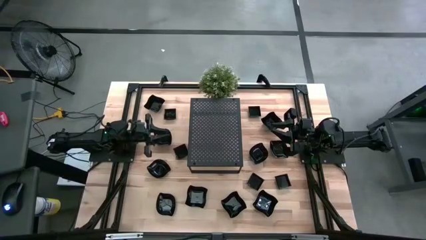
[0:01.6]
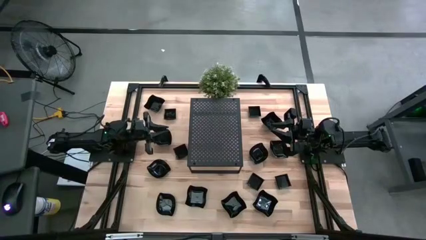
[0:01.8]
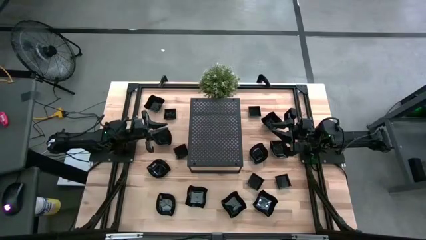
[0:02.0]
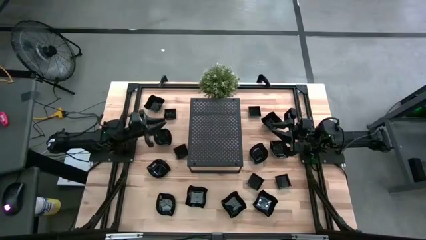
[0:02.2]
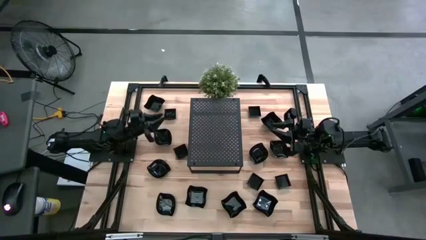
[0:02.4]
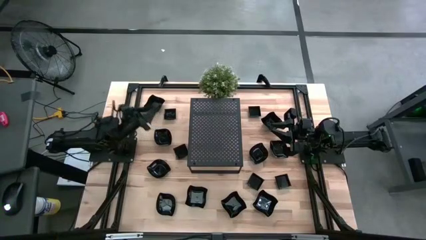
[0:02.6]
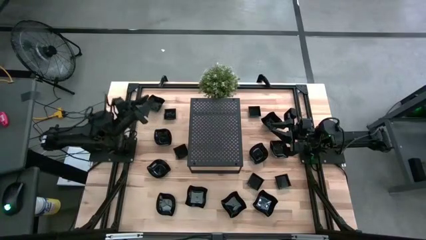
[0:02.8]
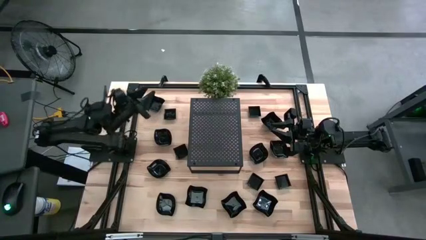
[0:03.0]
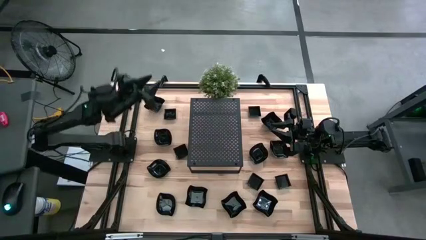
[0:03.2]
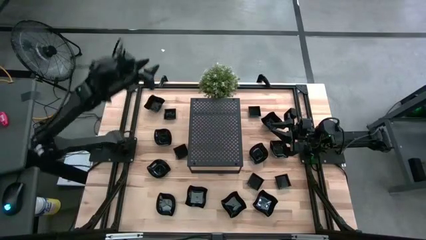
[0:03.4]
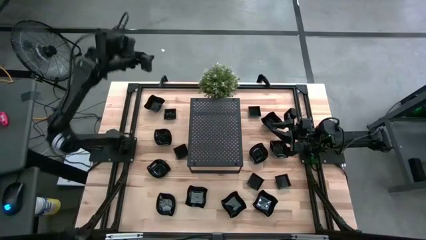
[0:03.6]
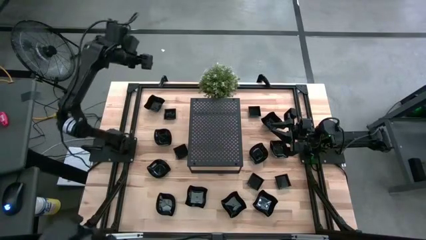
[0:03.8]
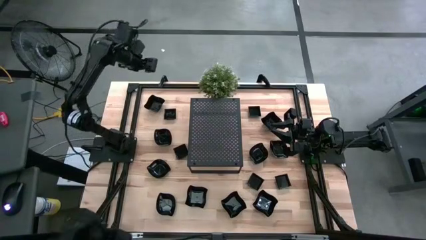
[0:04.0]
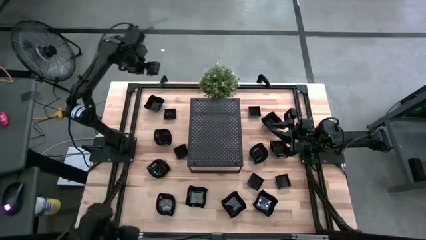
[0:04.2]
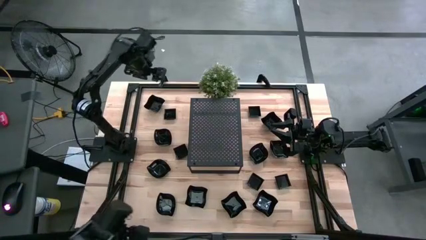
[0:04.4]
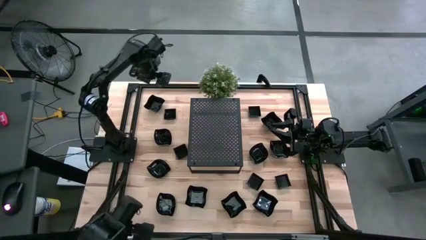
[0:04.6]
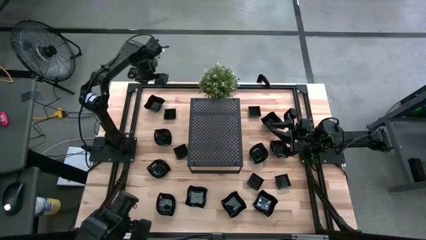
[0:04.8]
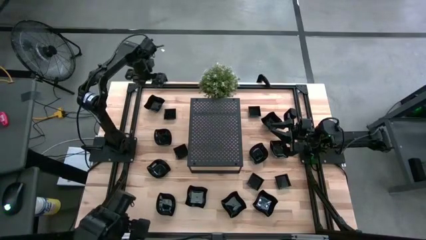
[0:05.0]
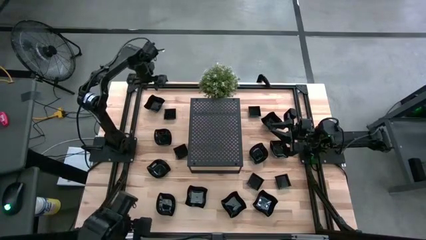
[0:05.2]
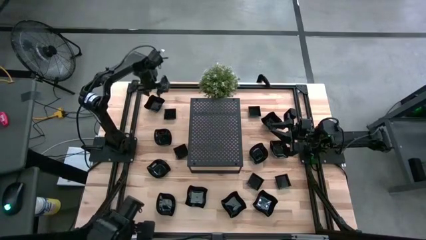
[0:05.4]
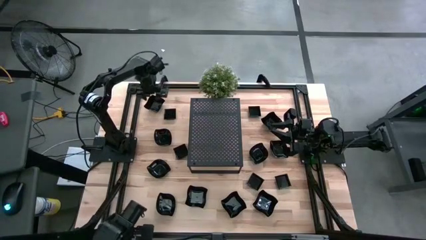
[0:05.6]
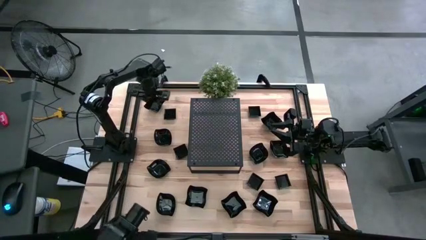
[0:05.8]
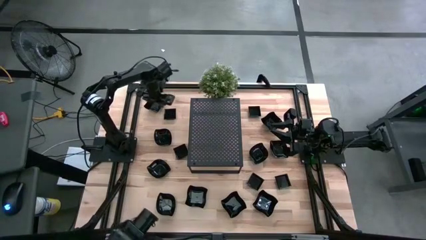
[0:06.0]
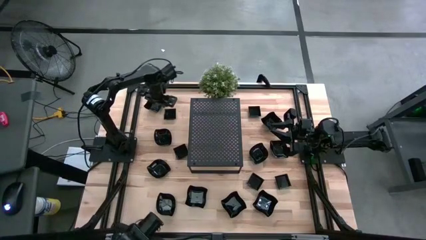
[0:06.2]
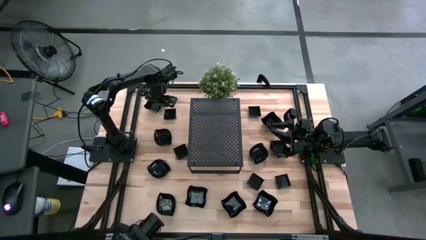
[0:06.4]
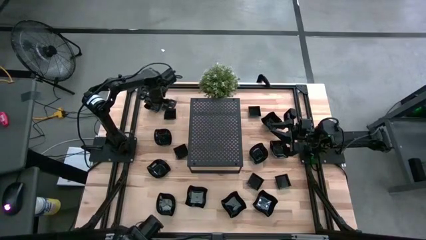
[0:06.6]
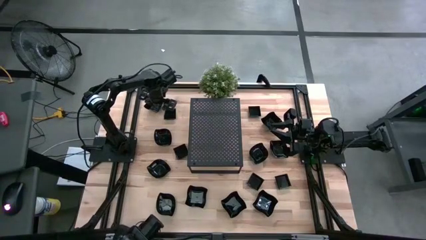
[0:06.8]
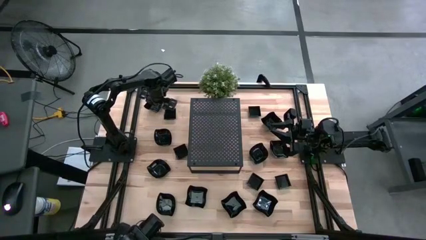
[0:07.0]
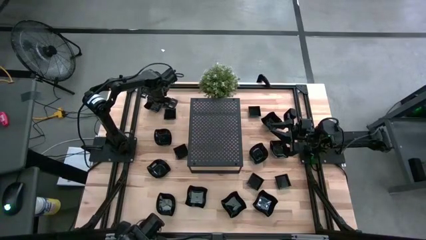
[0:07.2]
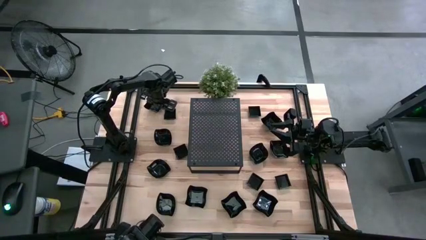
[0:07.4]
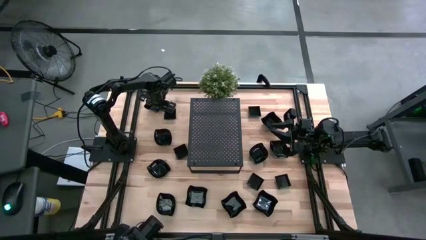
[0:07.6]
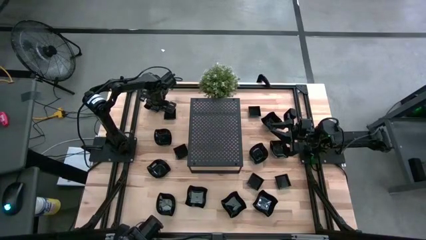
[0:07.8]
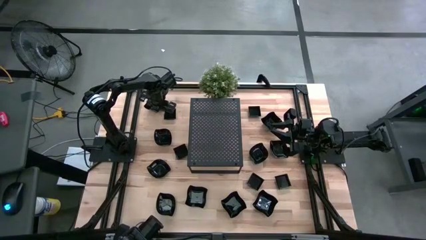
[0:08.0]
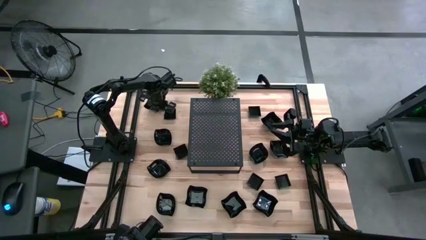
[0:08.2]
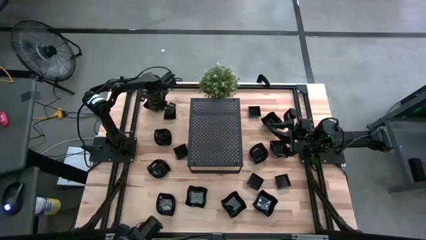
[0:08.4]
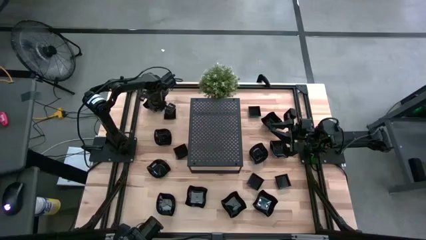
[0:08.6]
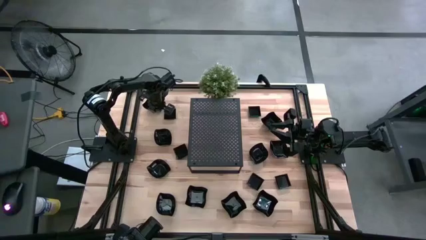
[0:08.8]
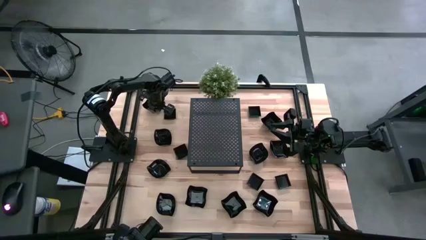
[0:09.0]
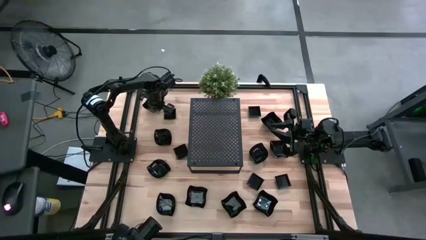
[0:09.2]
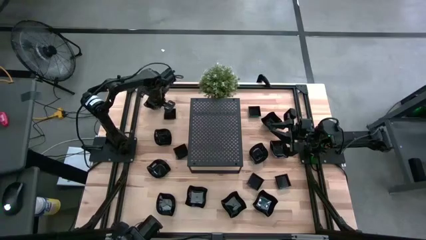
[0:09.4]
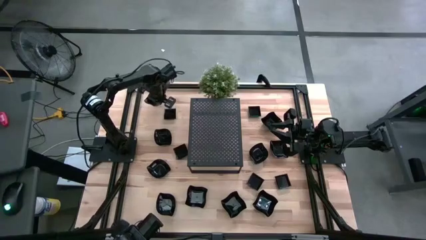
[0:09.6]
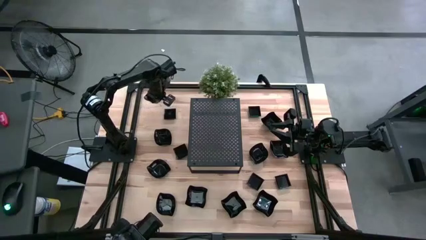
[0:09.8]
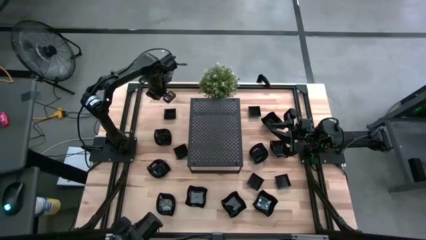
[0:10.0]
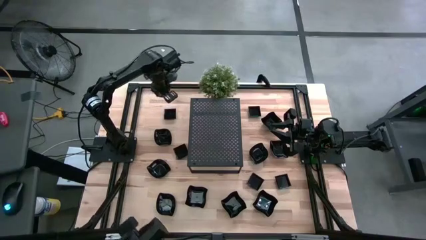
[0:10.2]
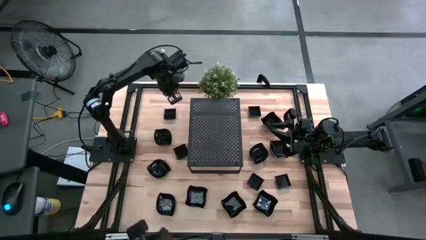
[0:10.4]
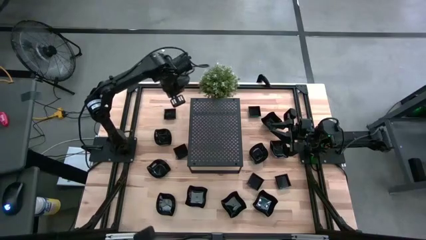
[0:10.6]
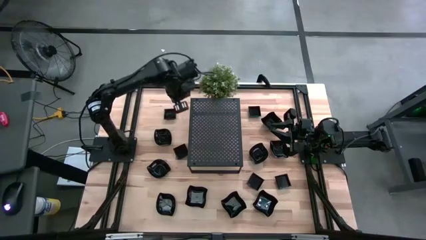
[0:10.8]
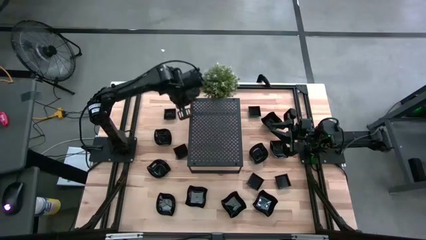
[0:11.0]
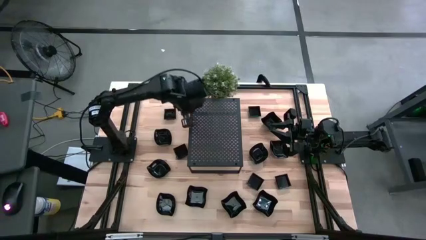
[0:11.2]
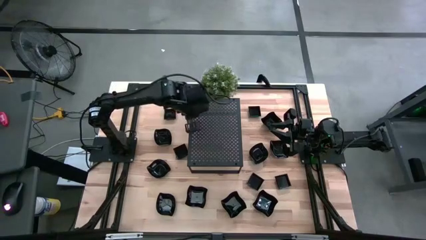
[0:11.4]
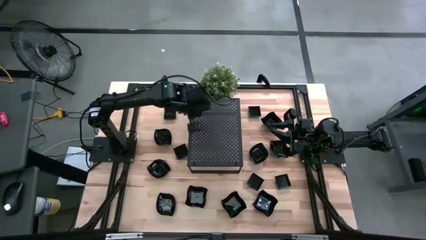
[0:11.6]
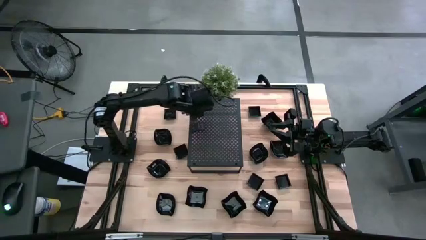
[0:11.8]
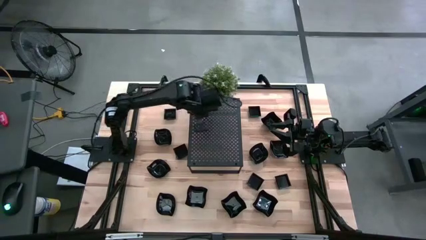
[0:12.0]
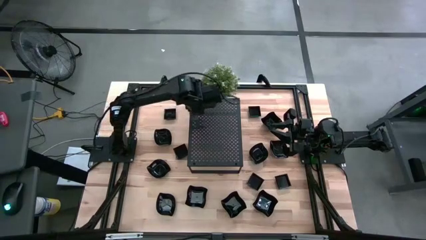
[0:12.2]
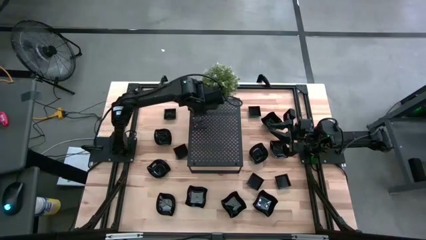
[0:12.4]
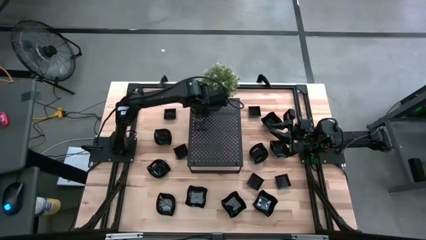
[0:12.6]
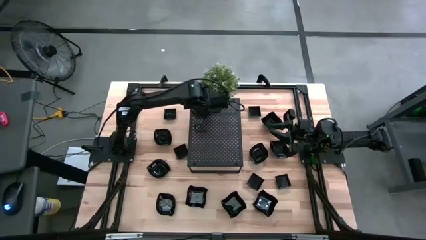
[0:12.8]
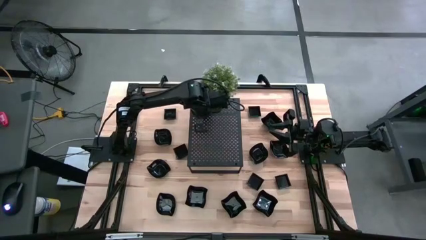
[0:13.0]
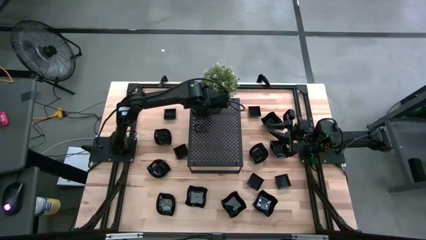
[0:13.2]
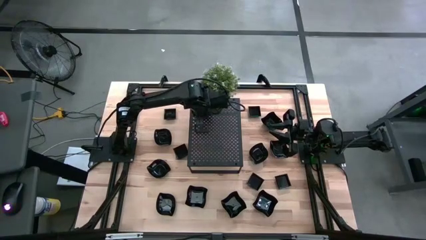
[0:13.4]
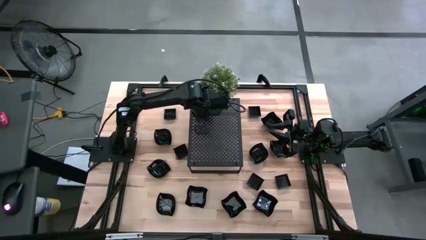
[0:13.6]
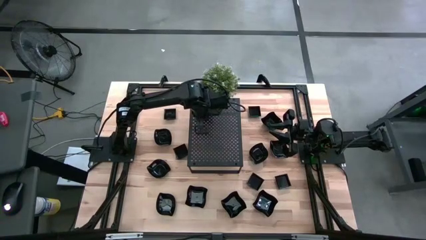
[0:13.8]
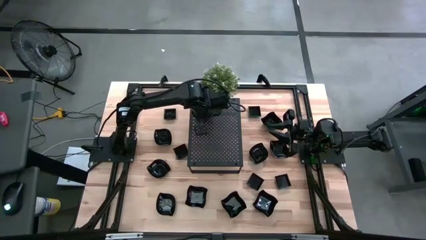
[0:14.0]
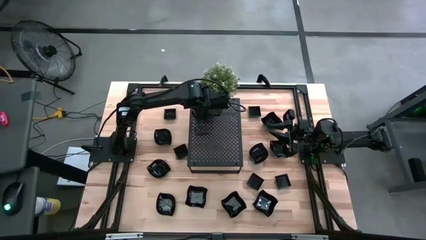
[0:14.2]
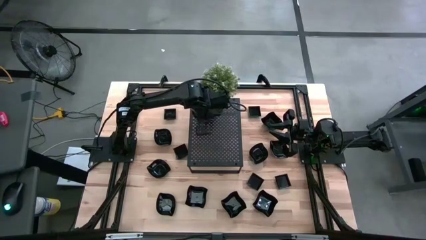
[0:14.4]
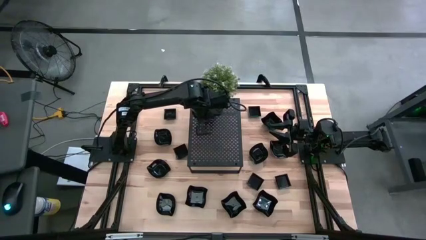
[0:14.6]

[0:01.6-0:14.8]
Task: Pick & Place Mini shaped plates
Put the distorted square plate on the shelf
